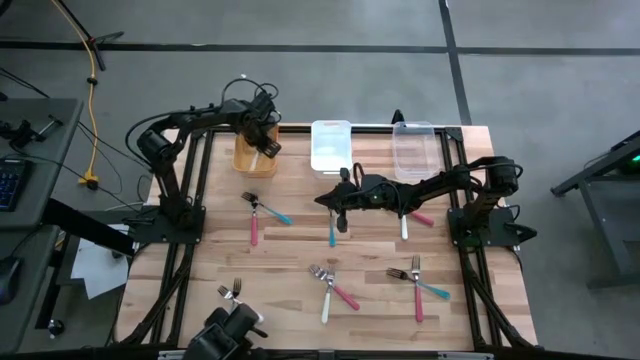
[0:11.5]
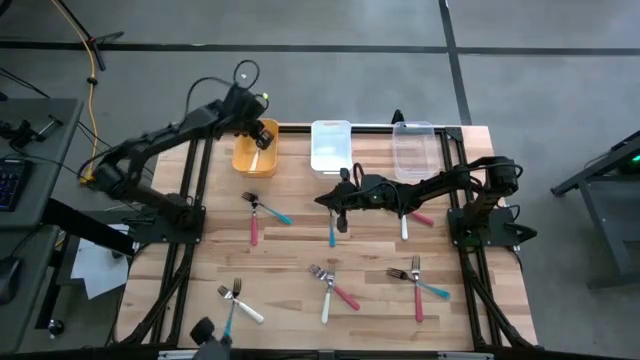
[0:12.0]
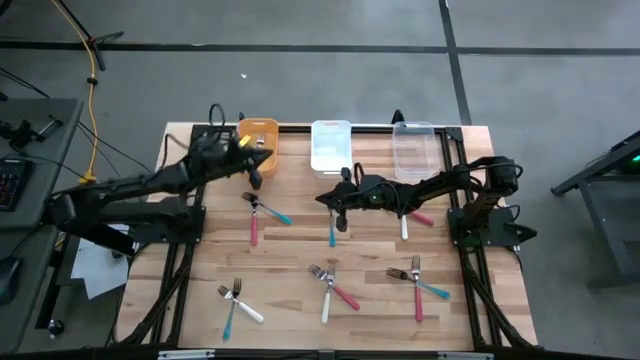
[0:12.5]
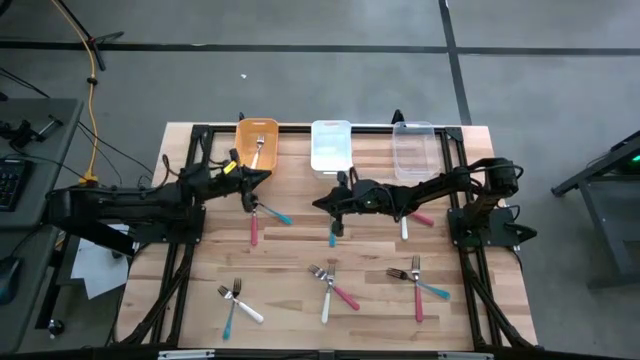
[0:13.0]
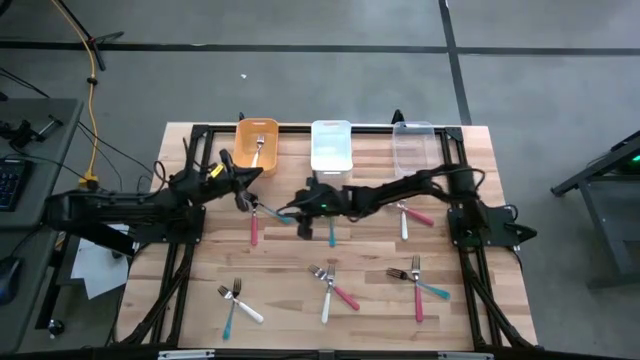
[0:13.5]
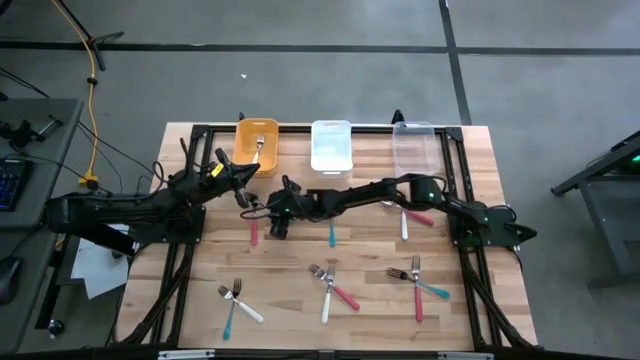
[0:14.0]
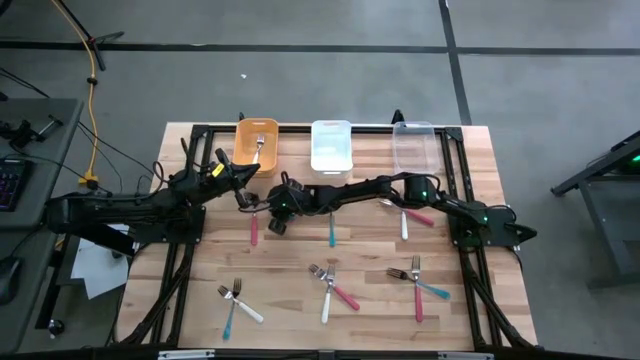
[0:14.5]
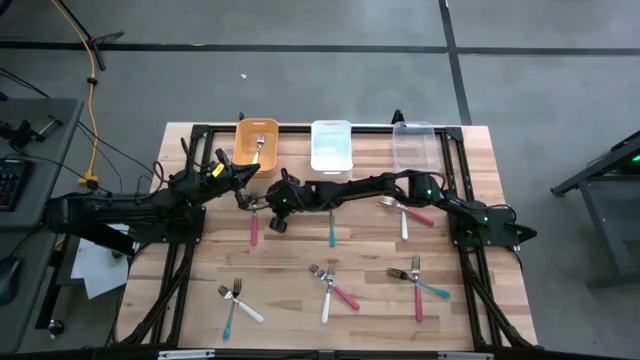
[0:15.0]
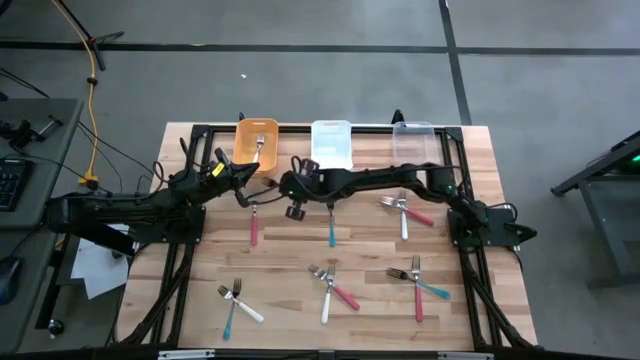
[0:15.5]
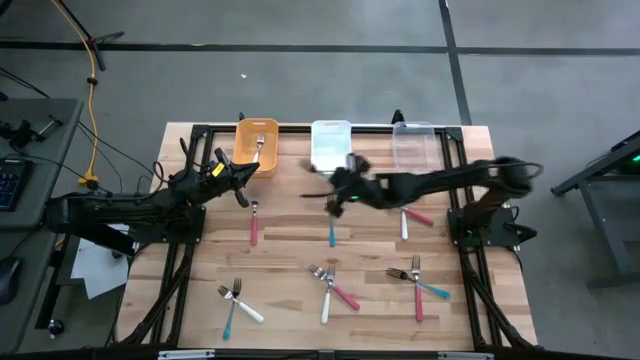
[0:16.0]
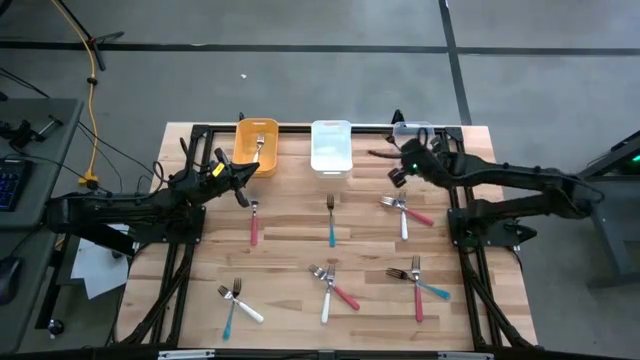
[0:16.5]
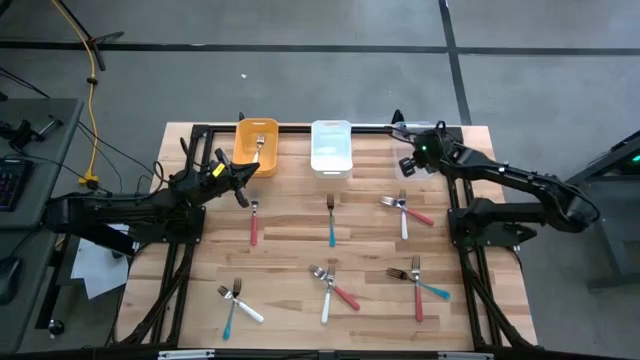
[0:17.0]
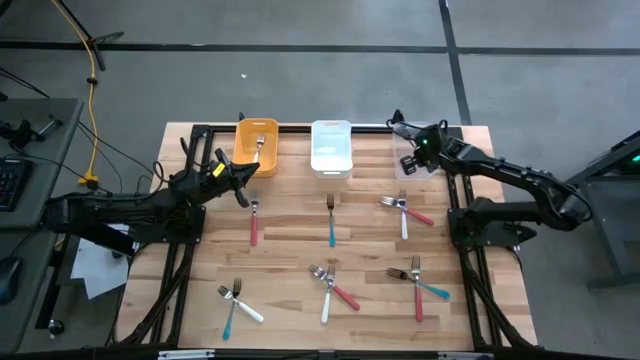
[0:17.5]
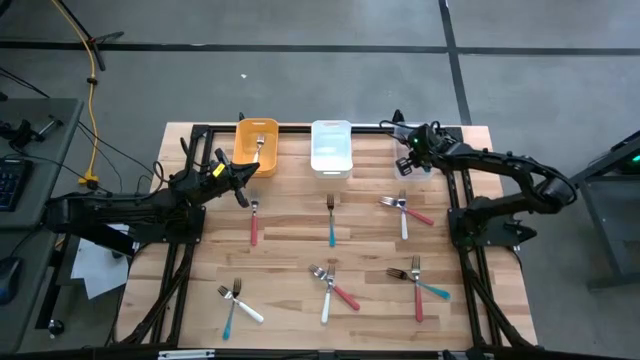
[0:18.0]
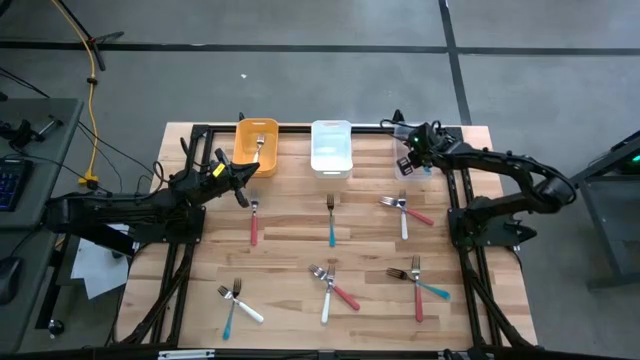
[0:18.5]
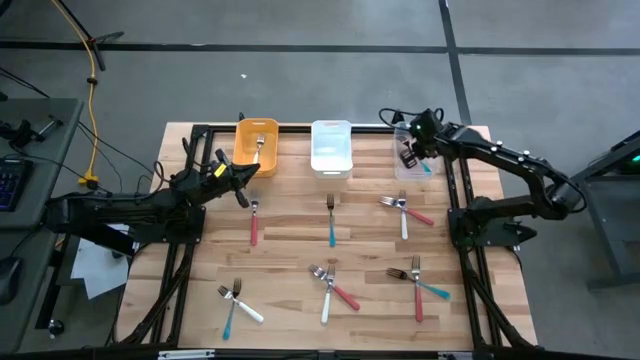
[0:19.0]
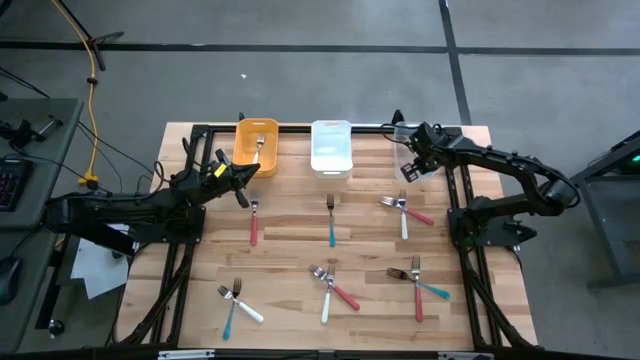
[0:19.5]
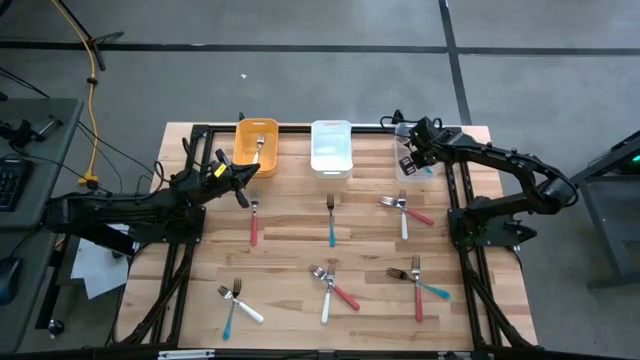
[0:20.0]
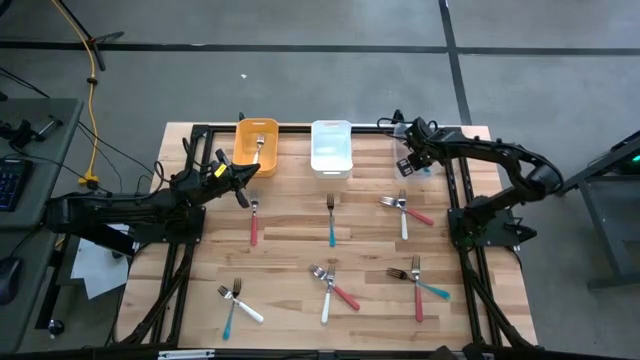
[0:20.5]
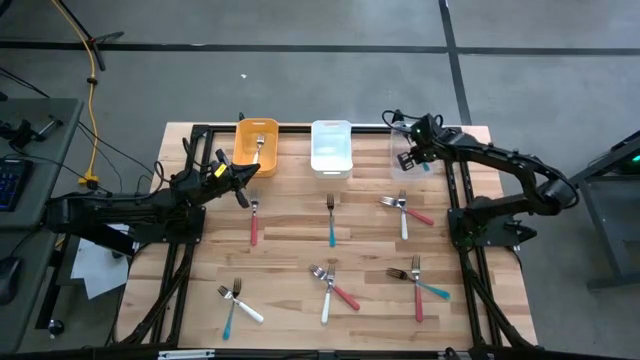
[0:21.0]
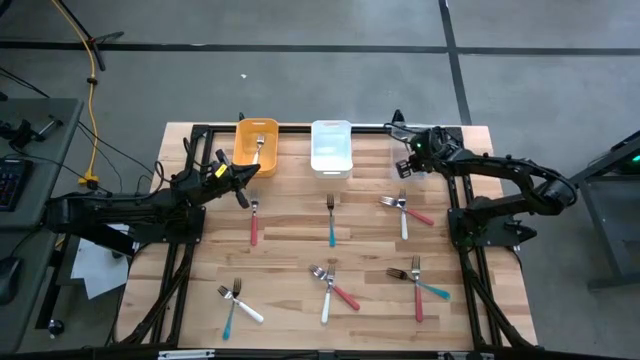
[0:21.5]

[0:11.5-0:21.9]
Task: Sort silverware by color (type)
Put the top left blue fork into the transparent bin

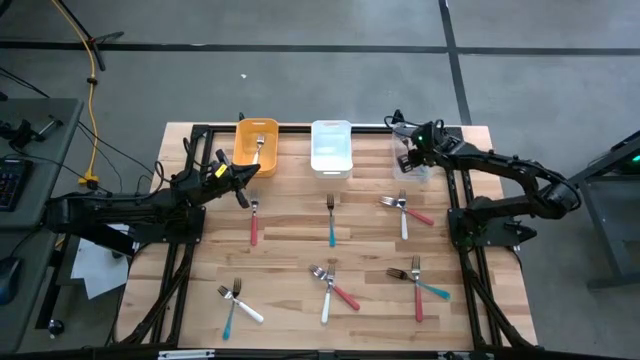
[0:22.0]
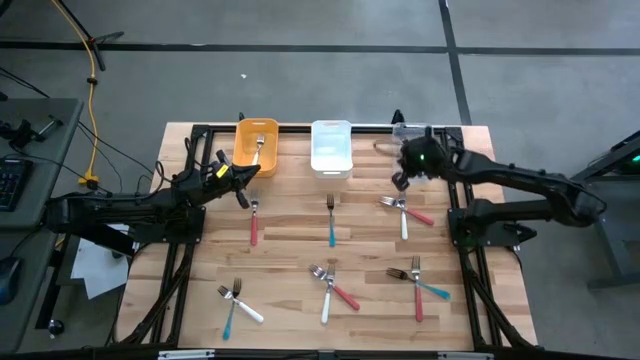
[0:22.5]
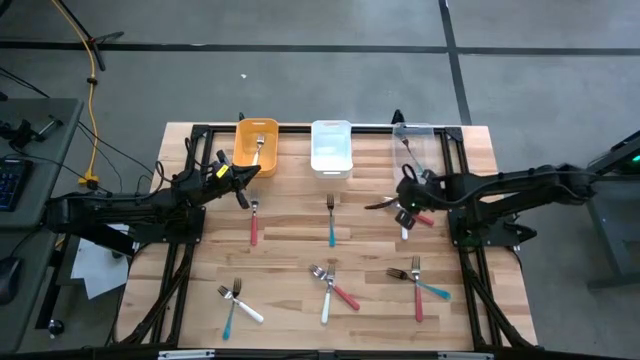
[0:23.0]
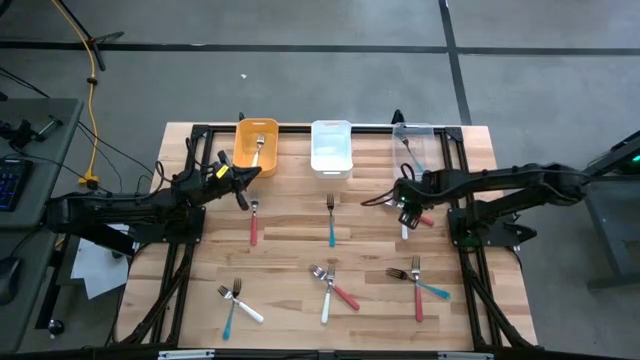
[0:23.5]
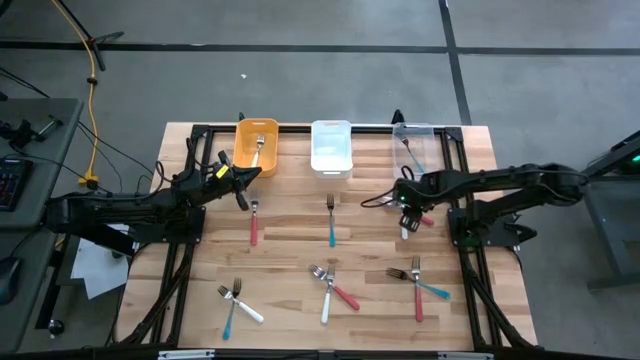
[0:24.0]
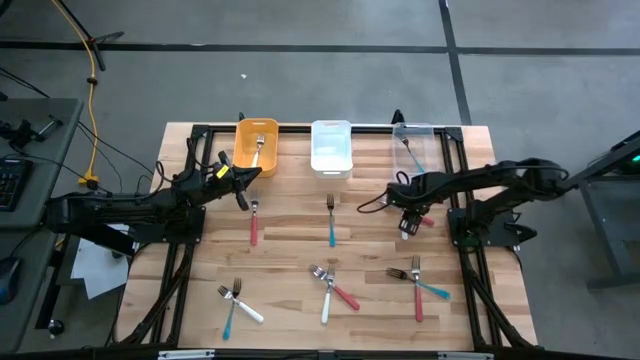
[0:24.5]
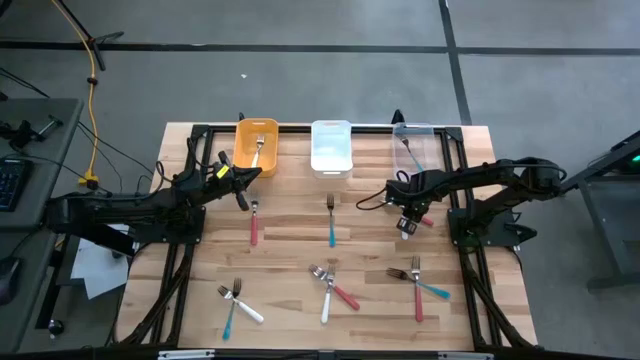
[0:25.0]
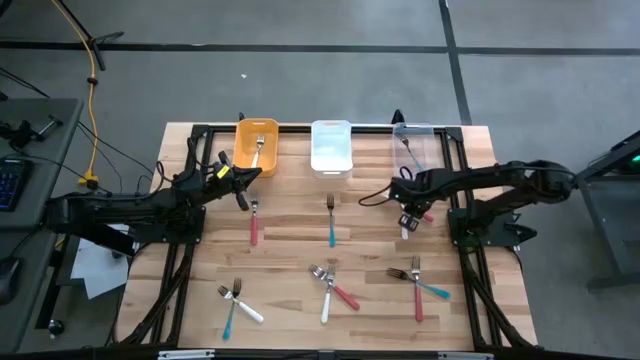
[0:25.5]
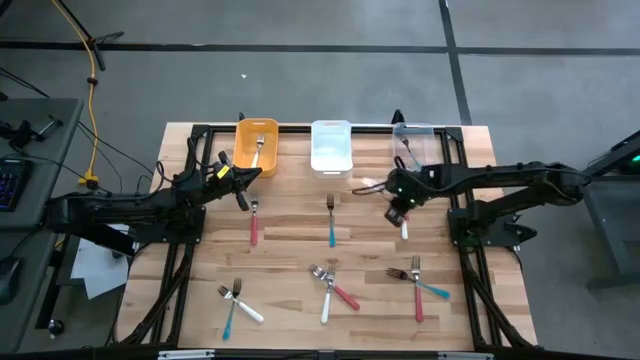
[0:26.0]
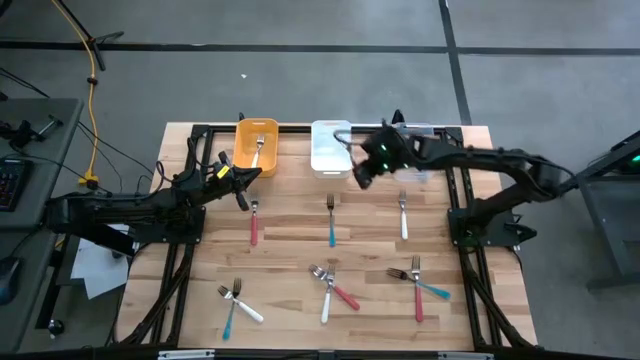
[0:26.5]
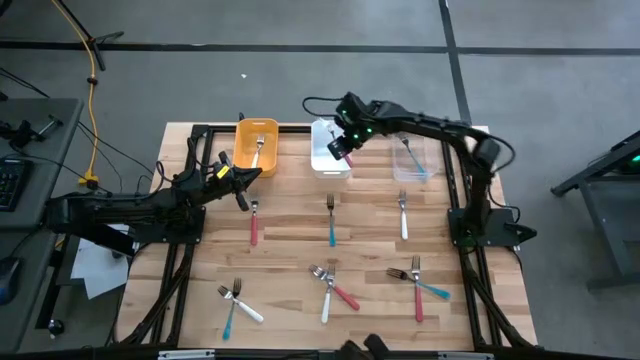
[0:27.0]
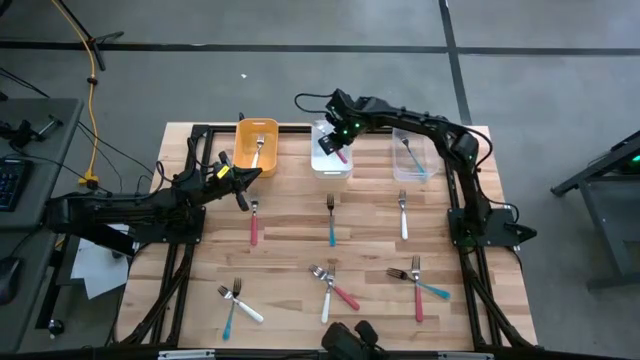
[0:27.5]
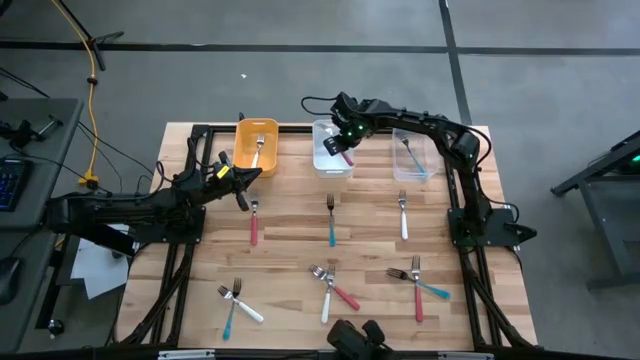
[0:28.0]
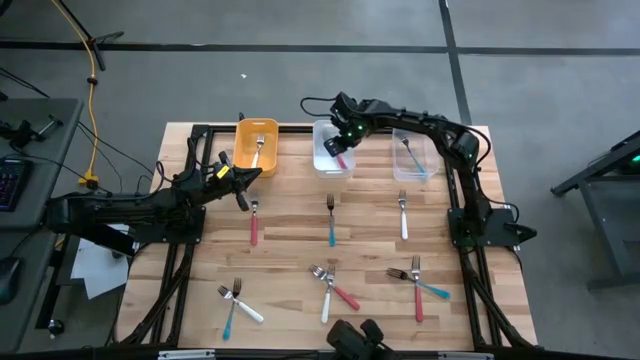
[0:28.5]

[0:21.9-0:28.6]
Put the top right pink fork into the white bin

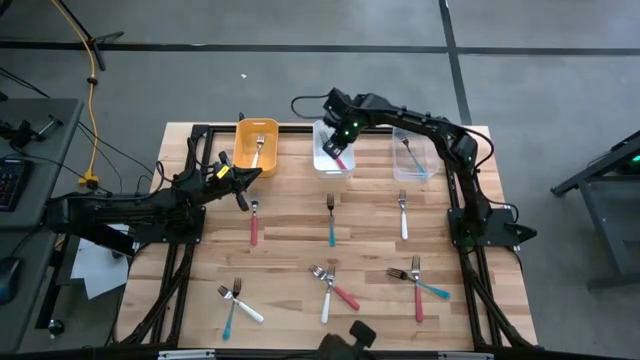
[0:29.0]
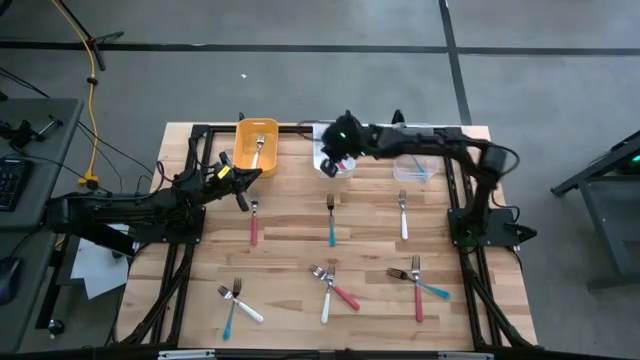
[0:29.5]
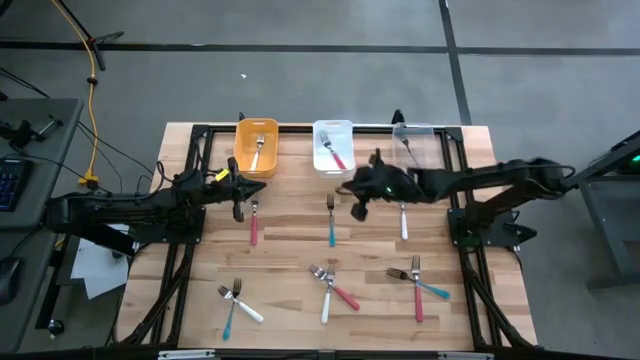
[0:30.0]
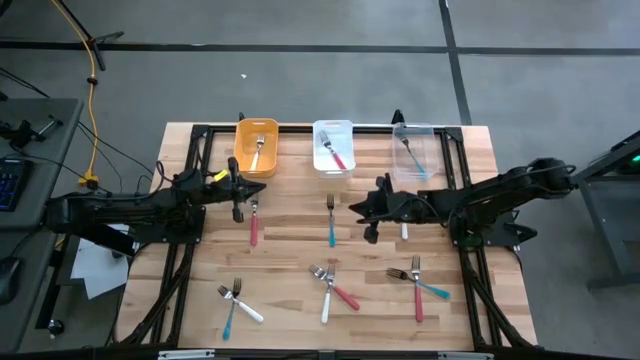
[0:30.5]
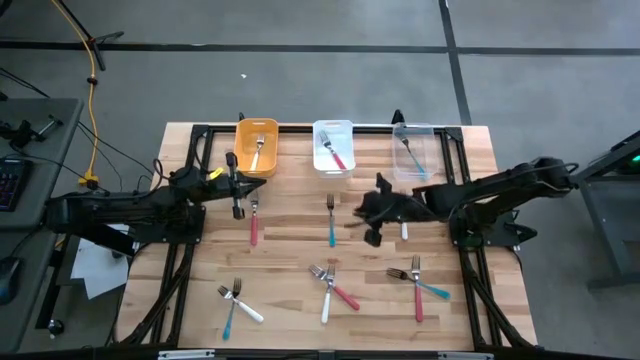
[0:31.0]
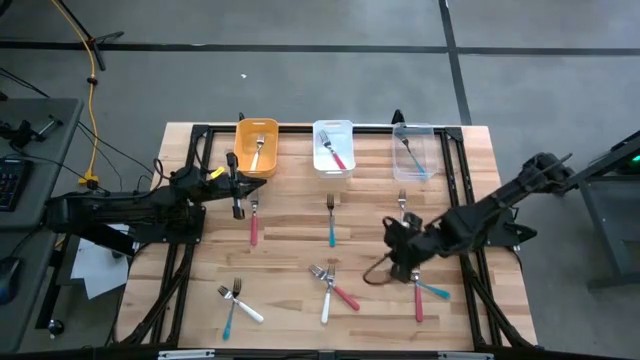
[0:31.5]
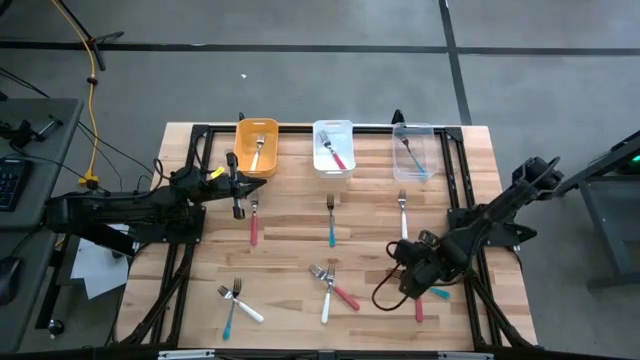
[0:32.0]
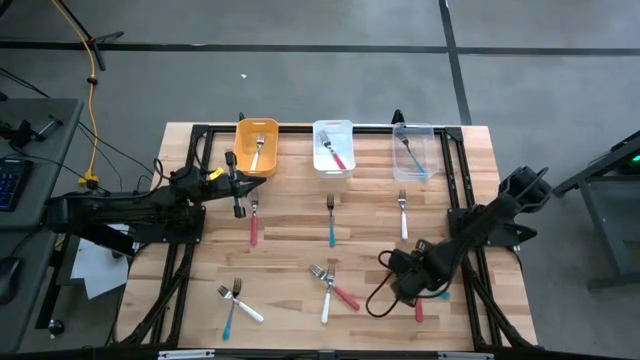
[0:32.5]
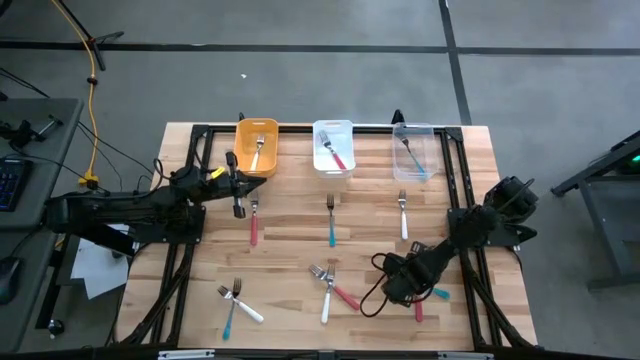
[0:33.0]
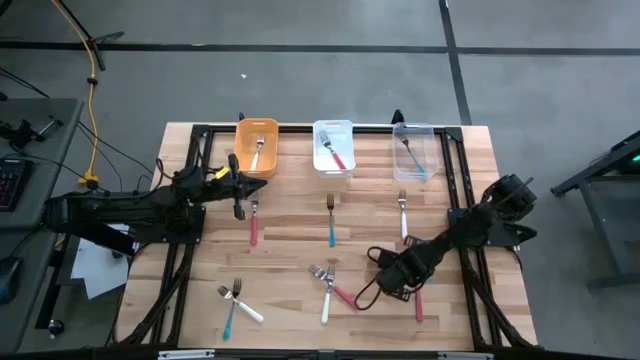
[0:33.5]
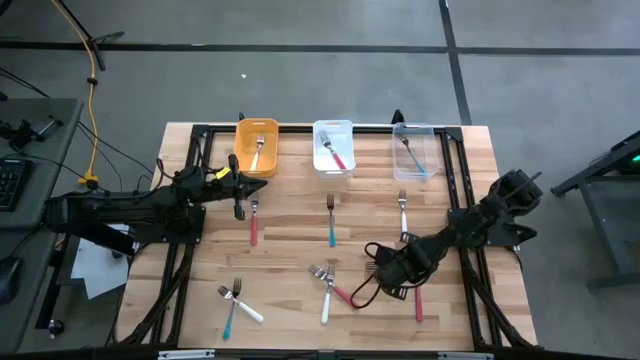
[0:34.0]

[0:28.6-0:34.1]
Put the bottom right blue fork into the transparent bin
